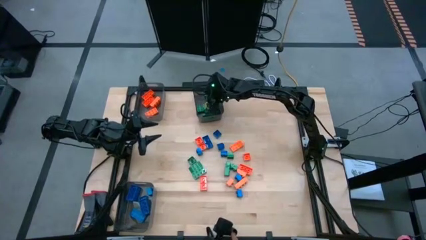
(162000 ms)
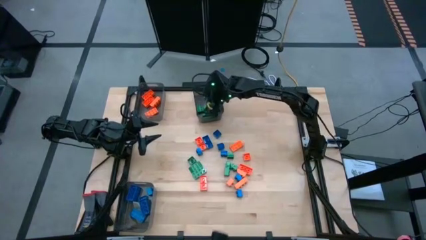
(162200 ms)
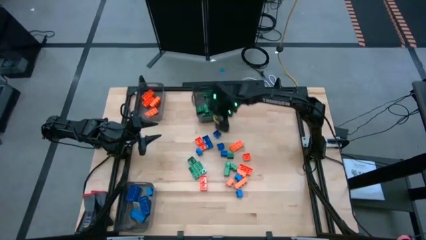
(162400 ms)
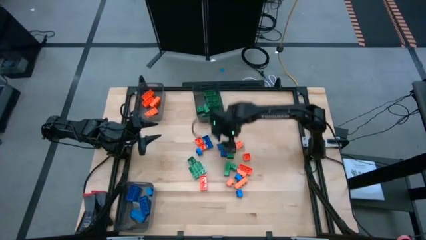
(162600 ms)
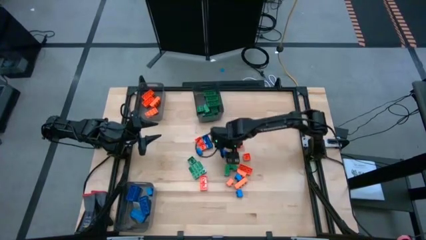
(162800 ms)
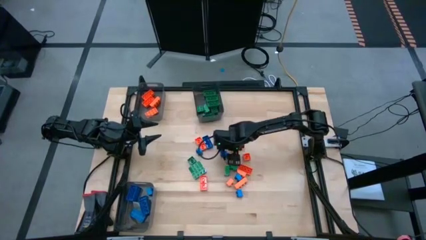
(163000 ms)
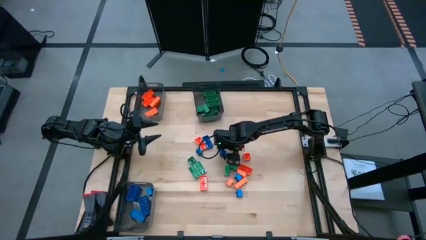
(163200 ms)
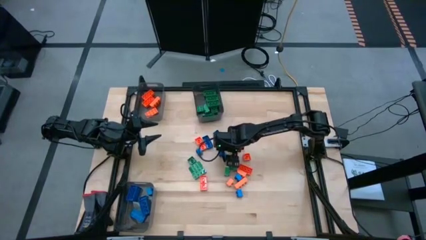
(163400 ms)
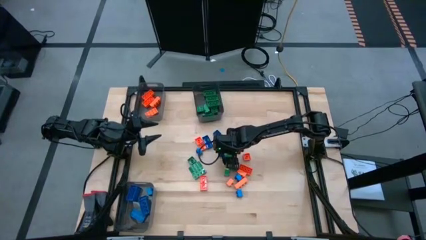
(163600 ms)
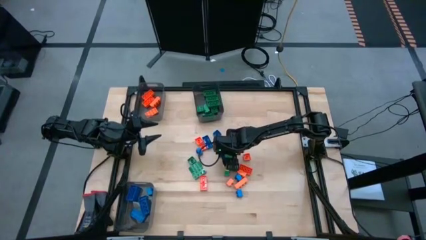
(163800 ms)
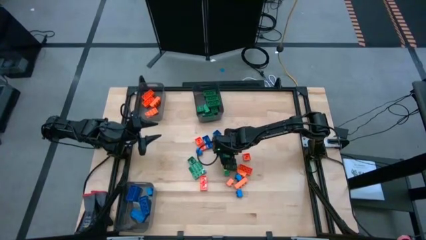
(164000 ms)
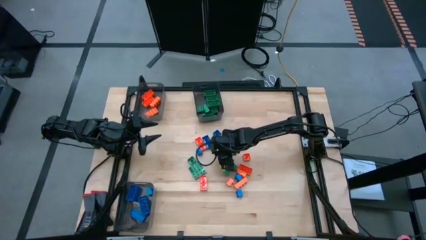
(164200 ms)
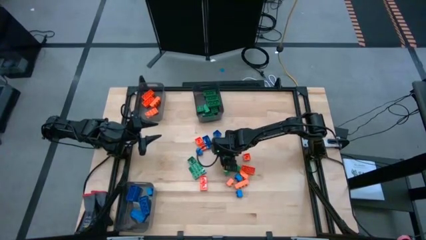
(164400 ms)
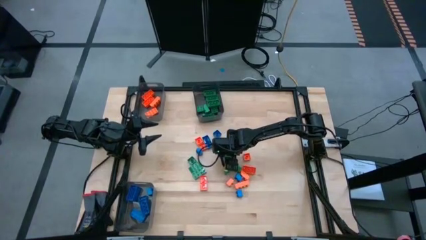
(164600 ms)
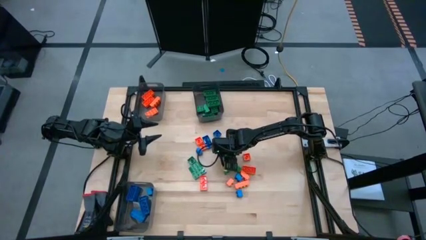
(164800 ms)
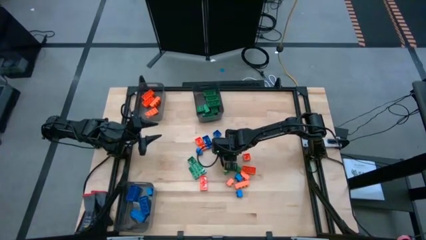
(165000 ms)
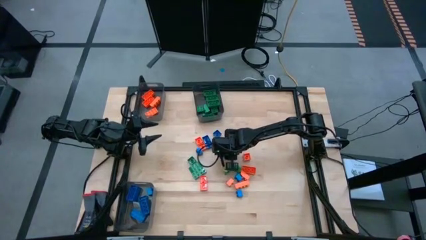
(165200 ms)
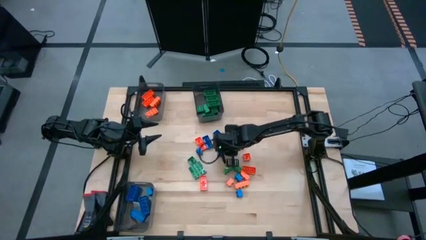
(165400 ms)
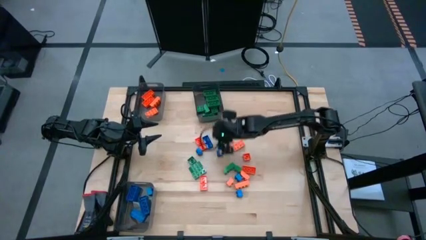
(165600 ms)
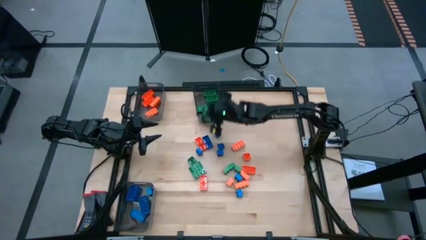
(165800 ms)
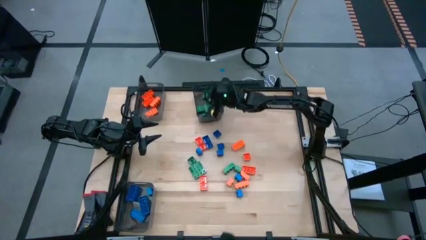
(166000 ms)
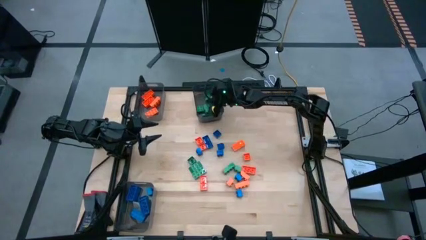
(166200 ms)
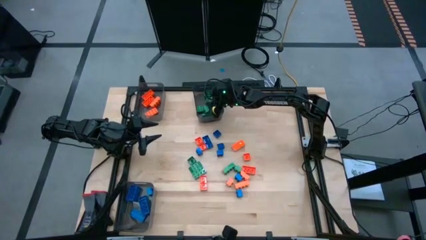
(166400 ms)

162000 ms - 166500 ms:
Task: Sort blocks
Put the green game piece into the top right black transparent bin

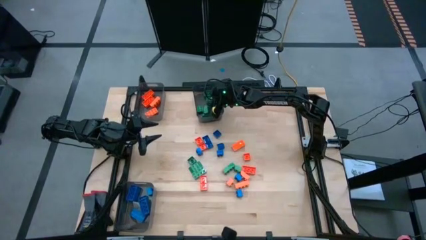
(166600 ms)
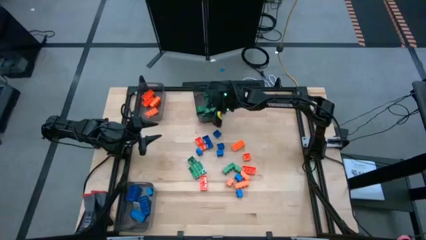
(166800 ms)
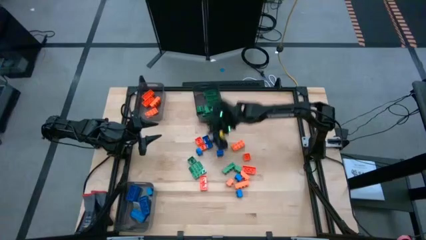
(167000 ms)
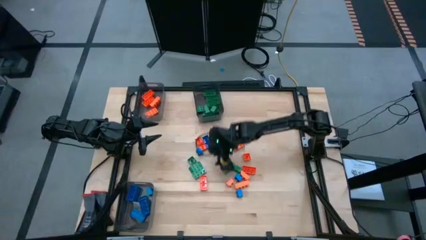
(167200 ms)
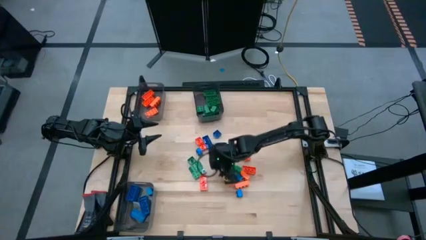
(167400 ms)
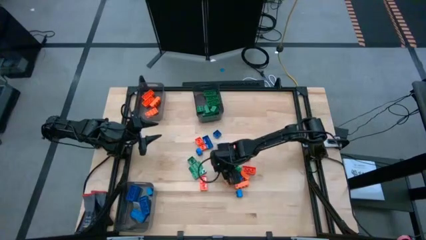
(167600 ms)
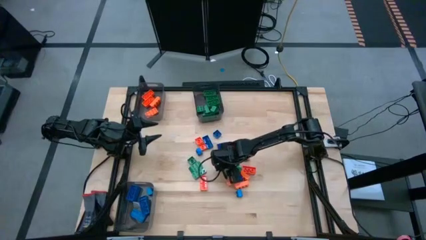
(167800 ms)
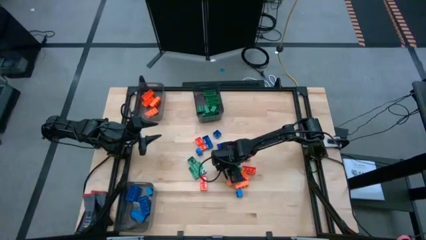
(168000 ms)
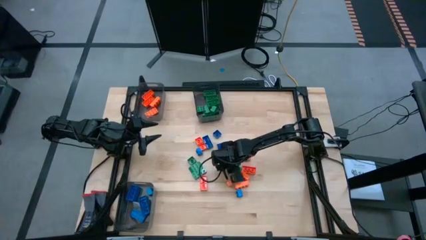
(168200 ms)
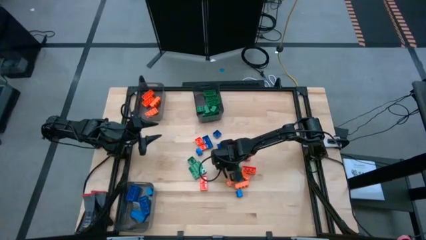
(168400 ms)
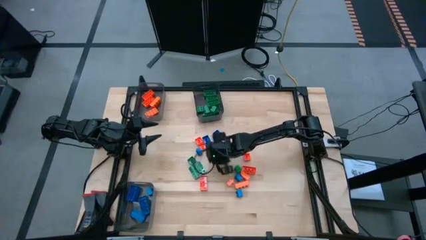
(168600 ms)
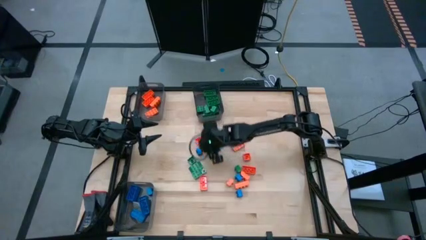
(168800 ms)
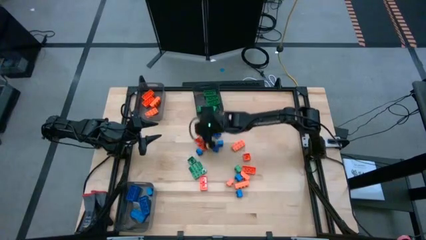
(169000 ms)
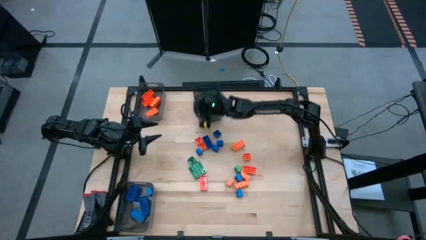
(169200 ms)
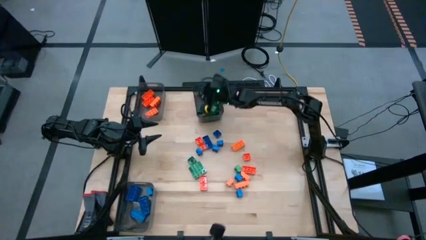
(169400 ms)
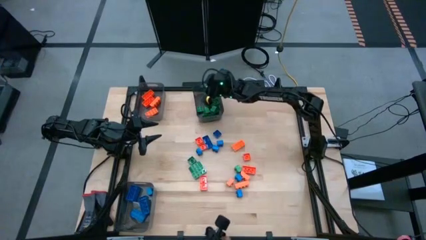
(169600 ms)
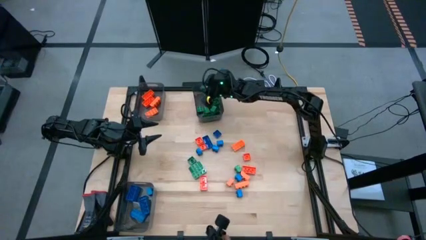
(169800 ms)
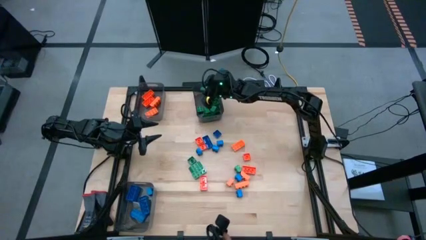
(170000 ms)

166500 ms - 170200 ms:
Put the green game piece into the top right black transparent bin

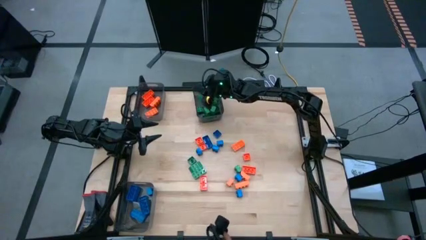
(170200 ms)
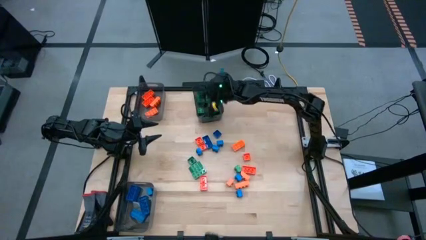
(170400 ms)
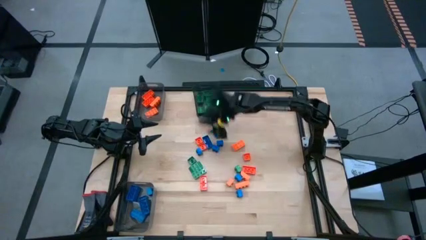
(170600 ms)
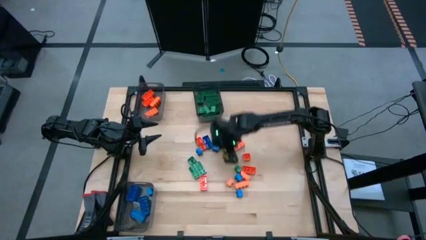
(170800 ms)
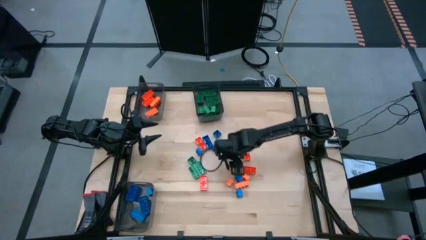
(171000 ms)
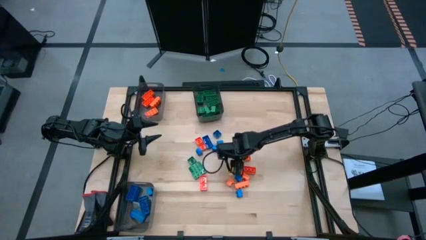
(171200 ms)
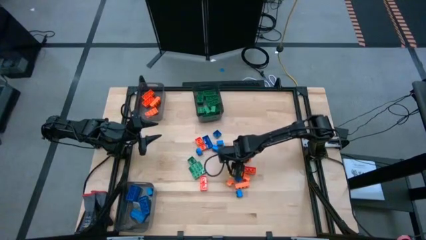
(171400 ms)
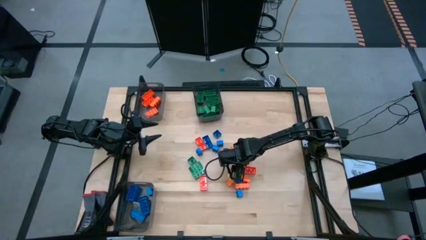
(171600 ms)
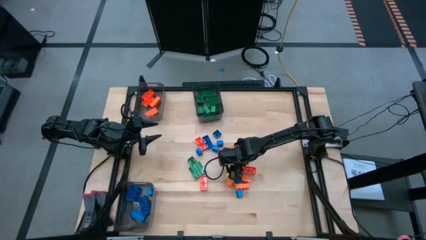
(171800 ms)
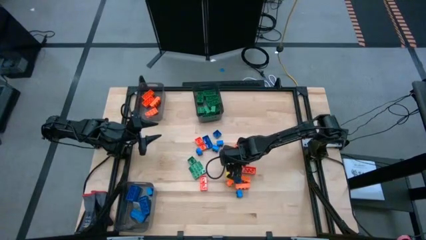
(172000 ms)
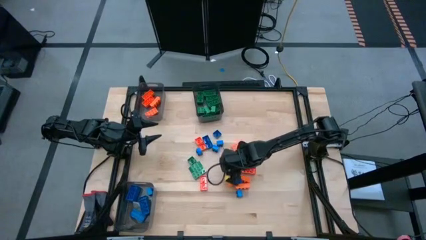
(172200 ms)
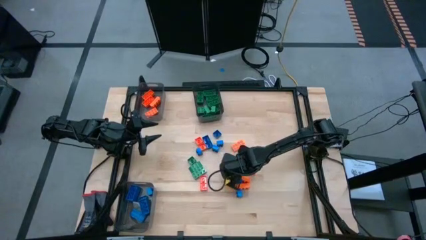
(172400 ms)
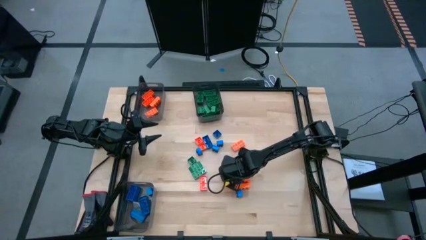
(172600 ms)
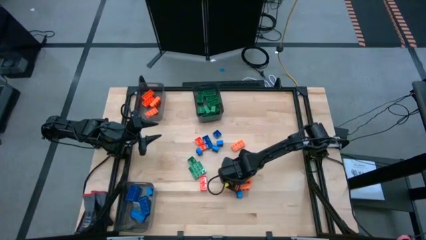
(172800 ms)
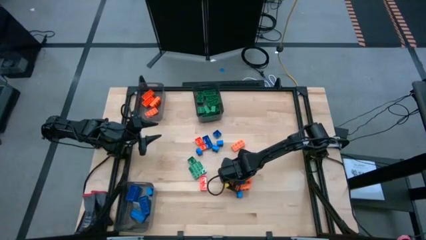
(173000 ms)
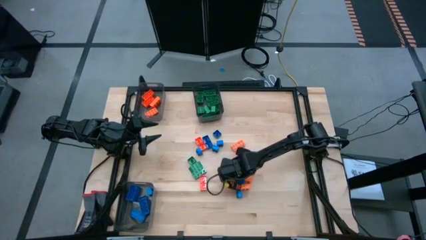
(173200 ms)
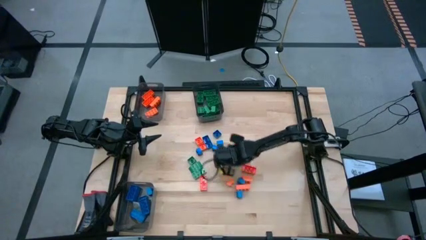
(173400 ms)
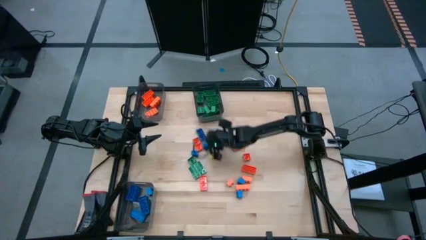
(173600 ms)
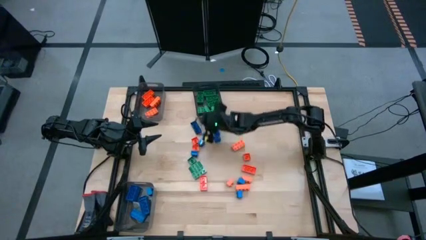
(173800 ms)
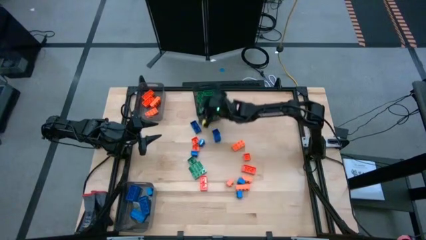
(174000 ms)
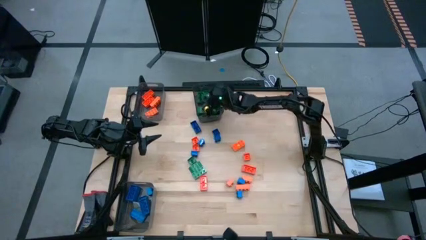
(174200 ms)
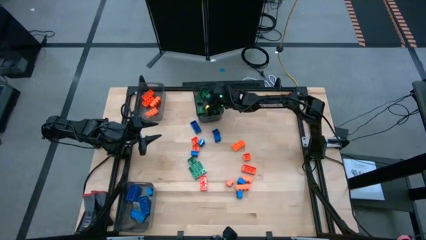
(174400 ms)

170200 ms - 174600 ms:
Put the green game piece into the top right black transparent bin

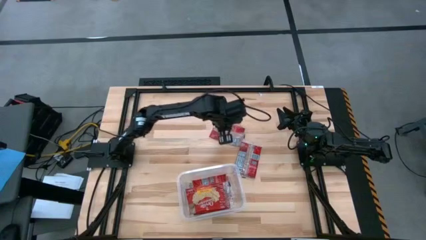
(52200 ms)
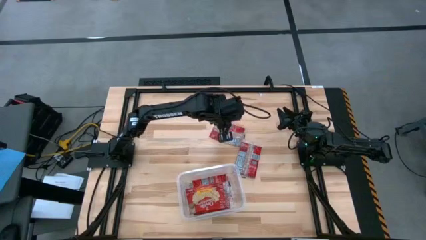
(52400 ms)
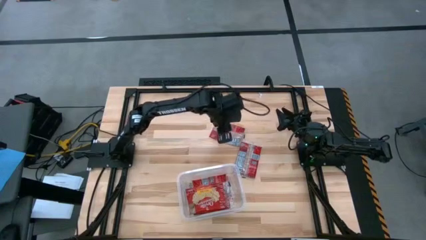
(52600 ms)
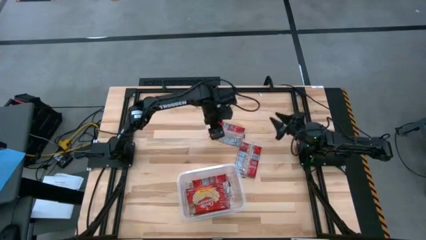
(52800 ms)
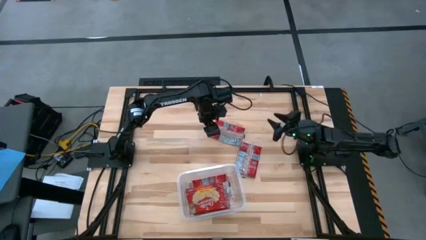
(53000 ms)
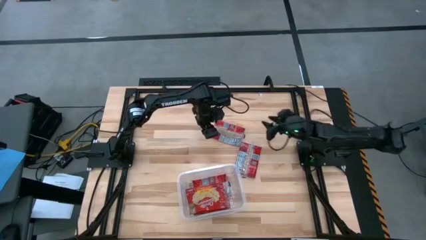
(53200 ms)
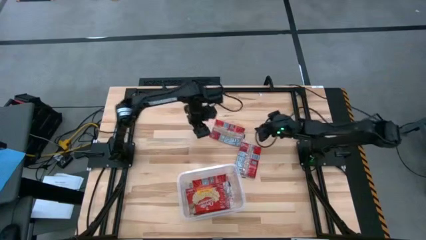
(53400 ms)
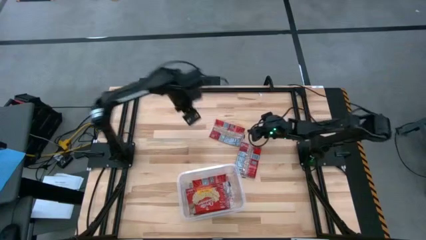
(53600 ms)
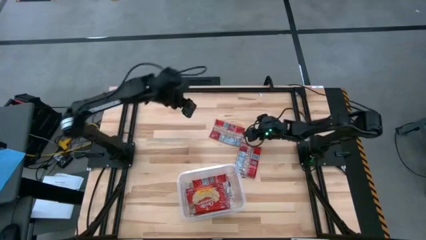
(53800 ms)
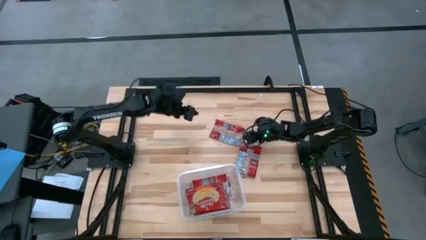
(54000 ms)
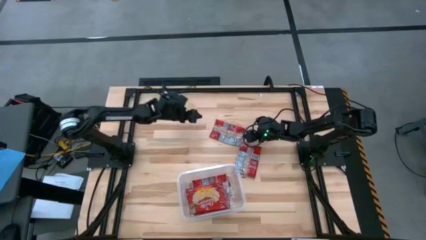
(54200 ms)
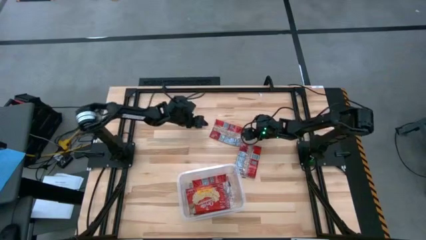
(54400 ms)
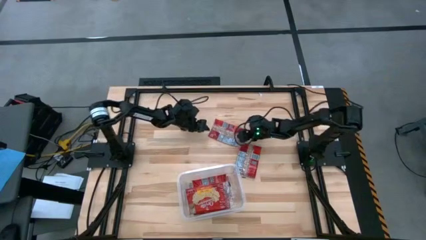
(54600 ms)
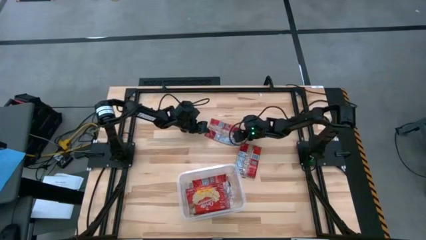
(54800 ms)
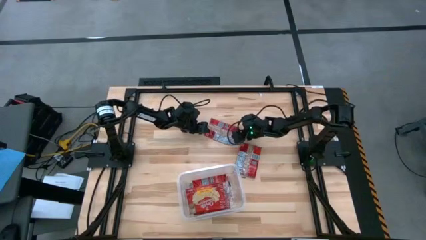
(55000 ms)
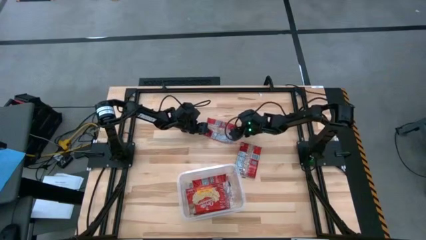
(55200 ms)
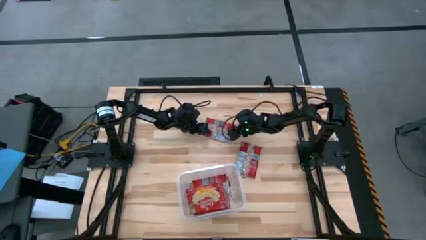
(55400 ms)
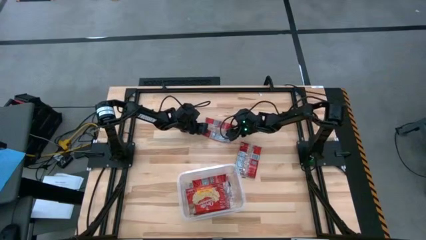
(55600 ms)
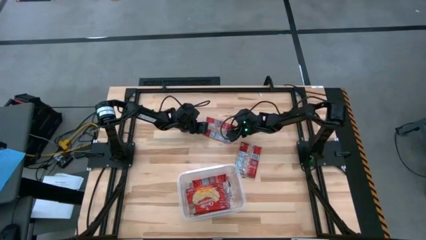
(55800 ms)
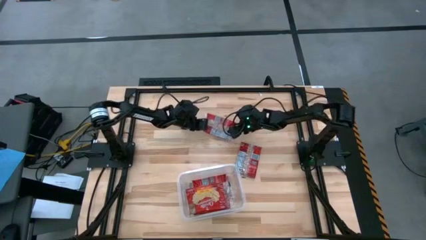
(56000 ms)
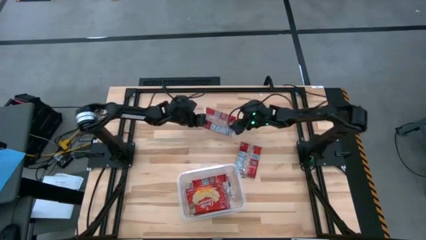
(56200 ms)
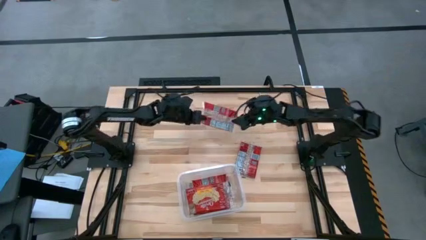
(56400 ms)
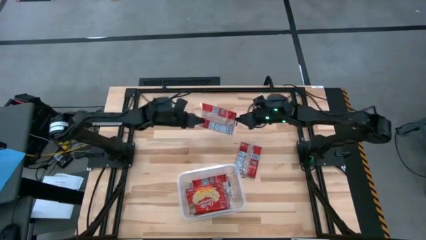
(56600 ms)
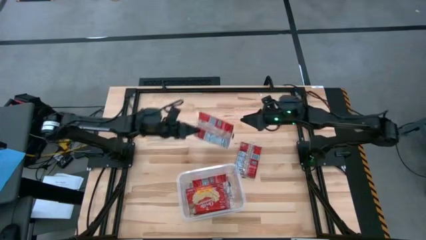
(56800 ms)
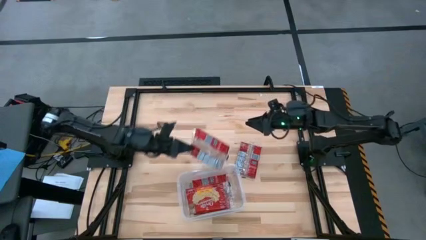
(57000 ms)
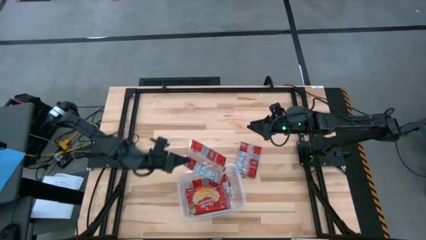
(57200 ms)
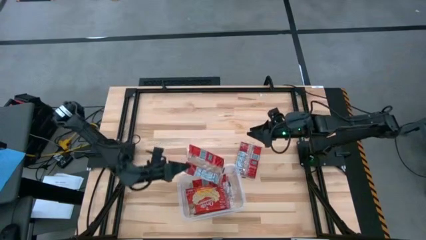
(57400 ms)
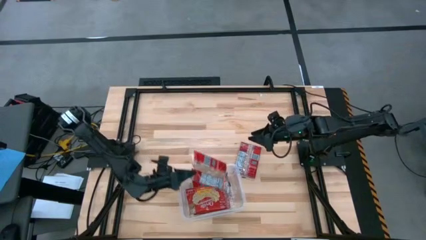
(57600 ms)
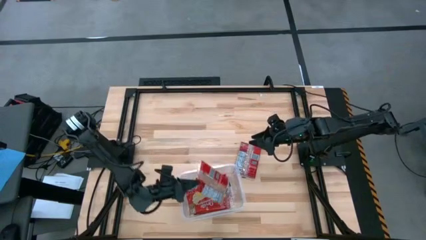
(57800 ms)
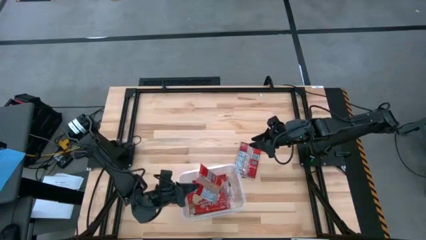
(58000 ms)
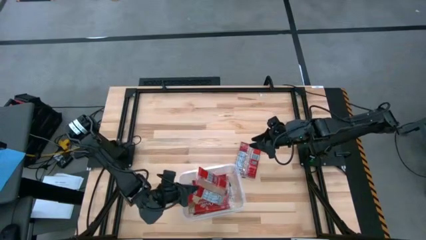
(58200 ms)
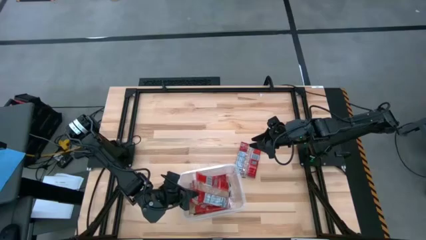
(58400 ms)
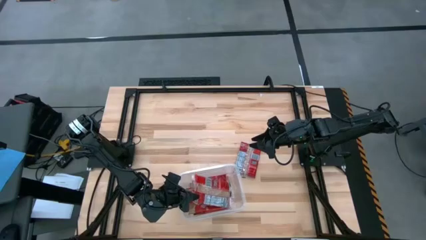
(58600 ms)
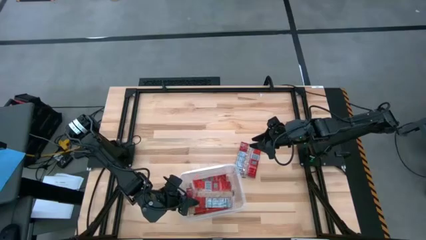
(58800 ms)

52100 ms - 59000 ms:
Task: Sort popcorn bags into baskets
Put the red popcorn bag into the transparent container
